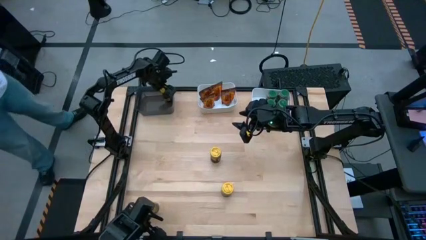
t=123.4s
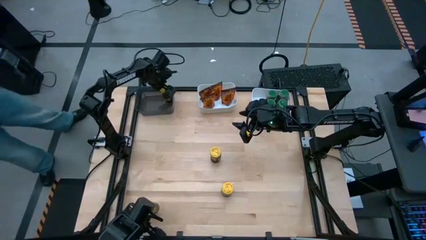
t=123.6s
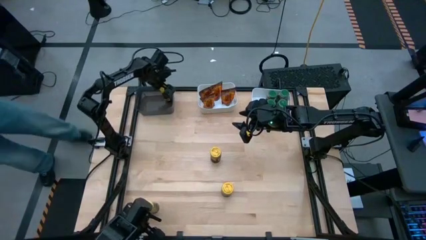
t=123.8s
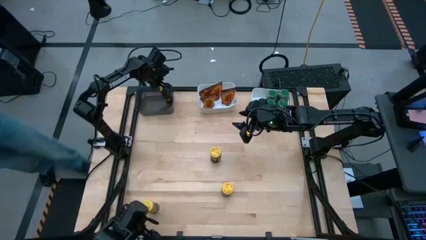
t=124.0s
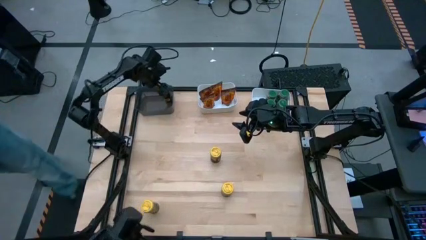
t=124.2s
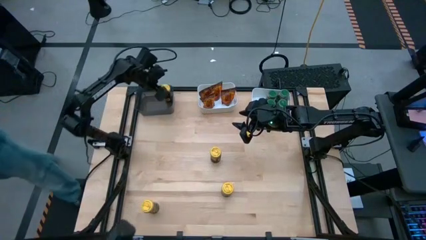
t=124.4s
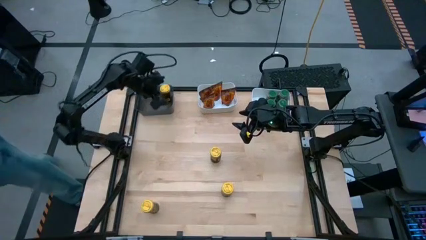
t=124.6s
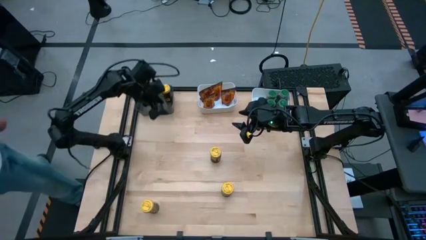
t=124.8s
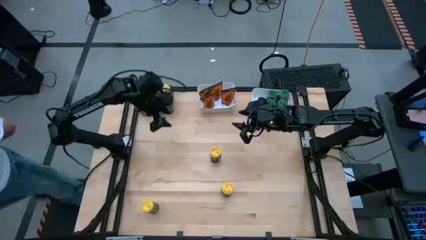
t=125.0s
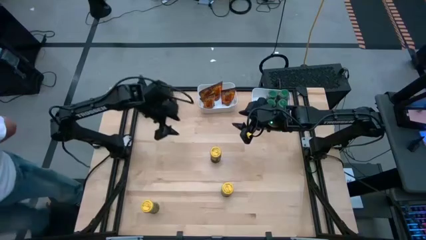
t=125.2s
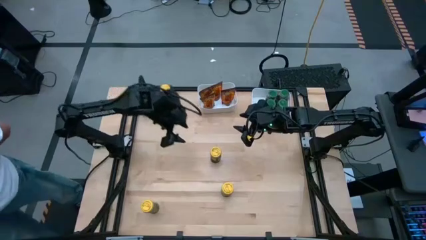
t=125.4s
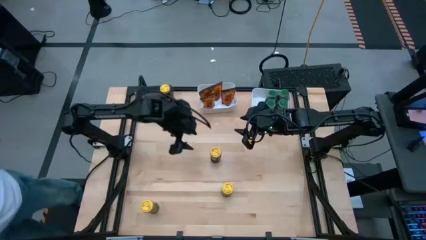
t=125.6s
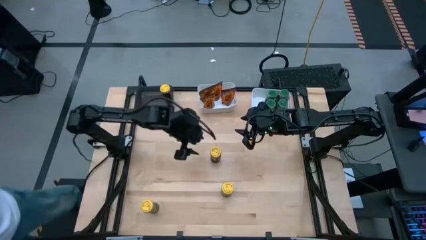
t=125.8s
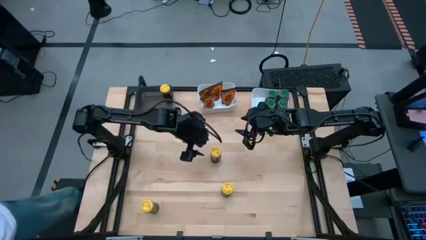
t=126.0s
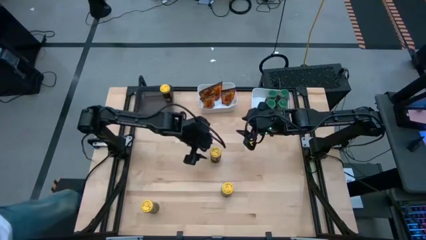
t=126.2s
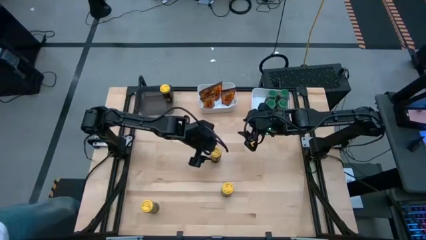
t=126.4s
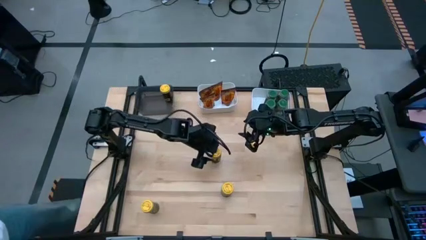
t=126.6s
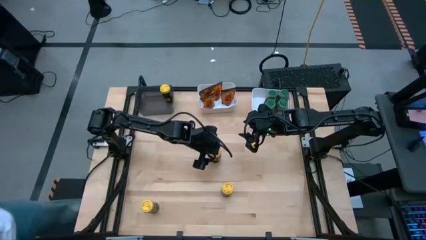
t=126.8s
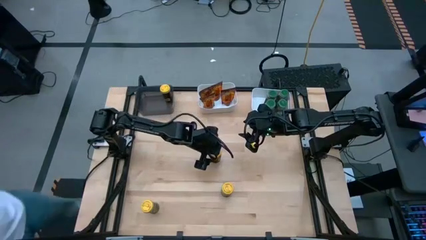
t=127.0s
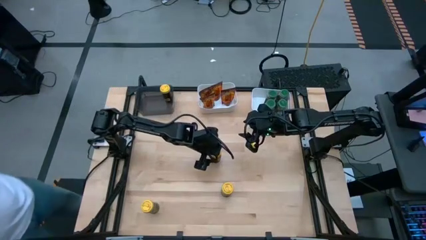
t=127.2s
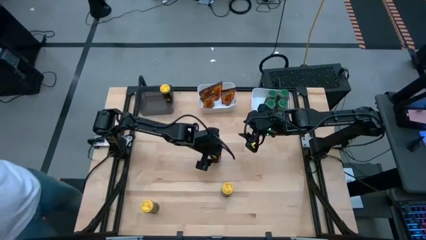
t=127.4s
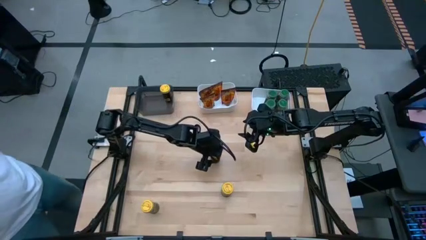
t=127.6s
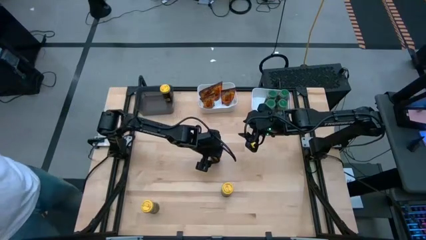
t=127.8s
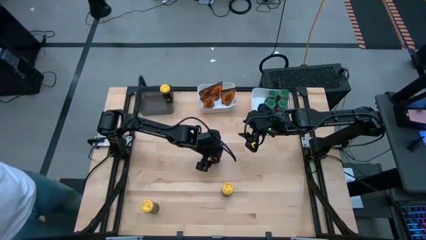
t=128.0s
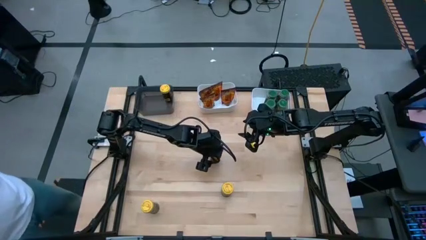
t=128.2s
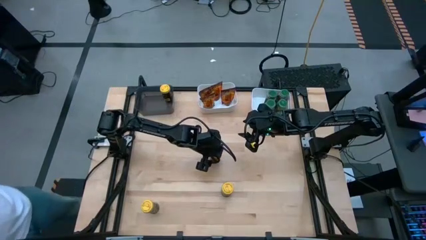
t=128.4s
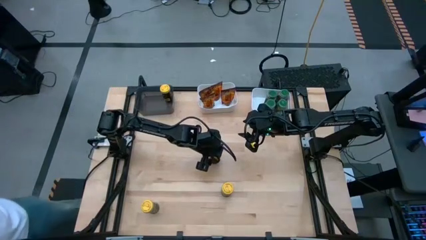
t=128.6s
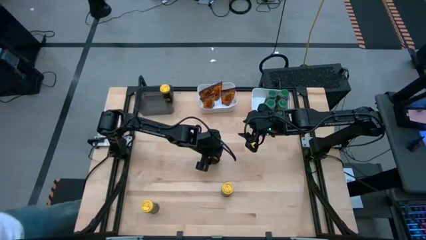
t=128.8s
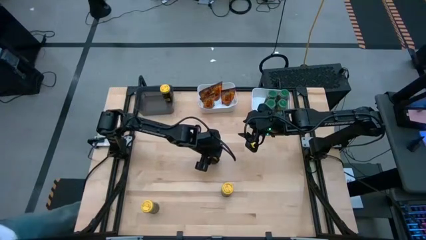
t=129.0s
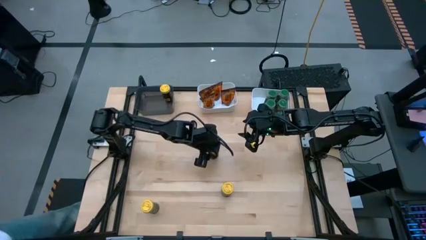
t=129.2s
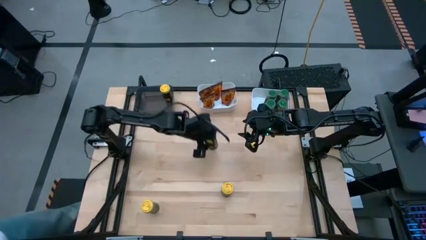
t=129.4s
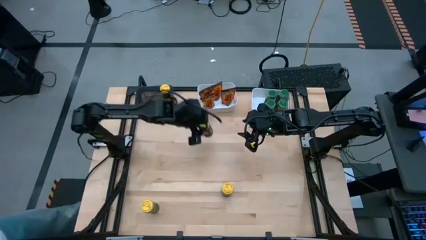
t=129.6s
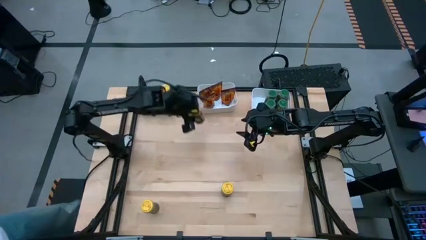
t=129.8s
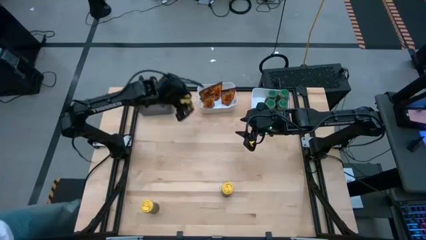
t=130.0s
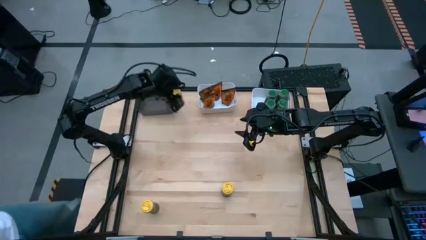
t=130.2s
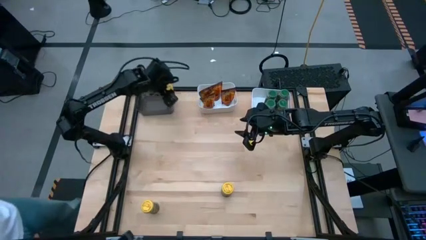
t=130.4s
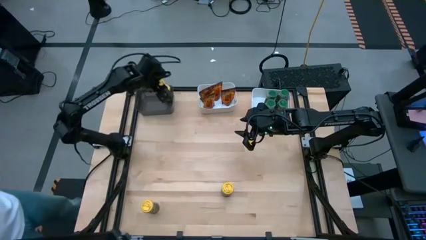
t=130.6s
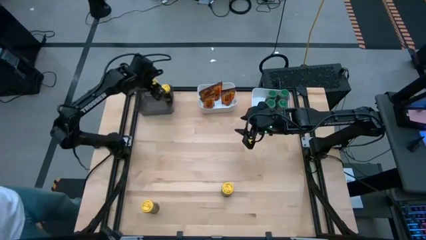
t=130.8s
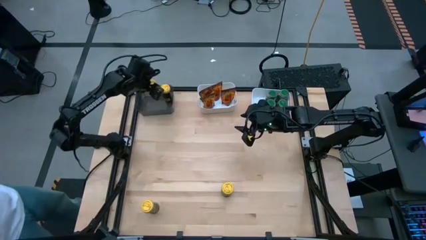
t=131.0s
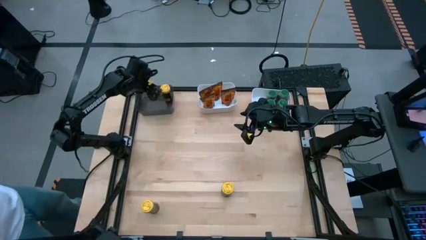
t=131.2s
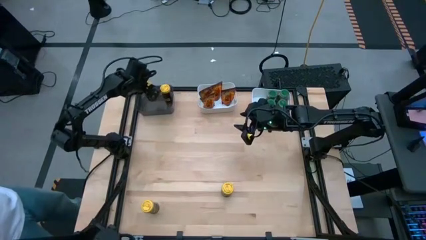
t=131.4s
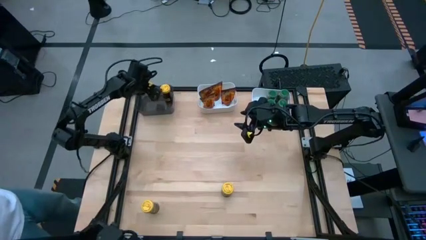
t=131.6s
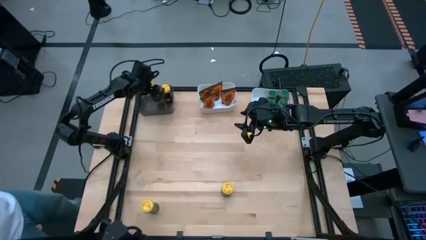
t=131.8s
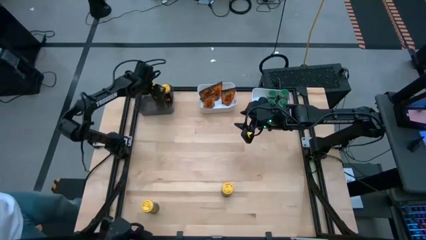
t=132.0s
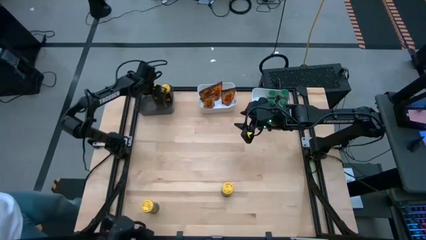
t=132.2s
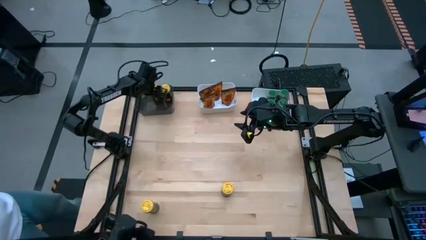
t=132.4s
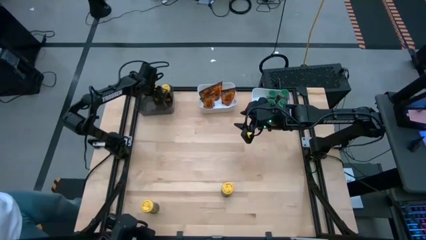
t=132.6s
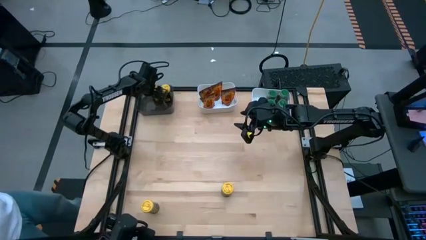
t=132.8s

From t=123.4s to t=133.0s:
Task: Sort spices by type
Put the top right yellow seasoning bottle into the black bin

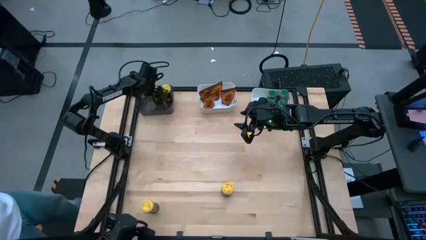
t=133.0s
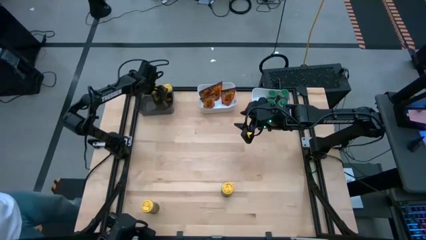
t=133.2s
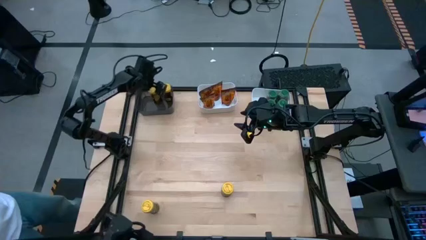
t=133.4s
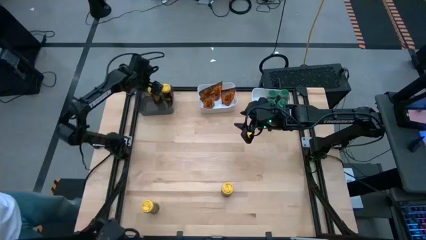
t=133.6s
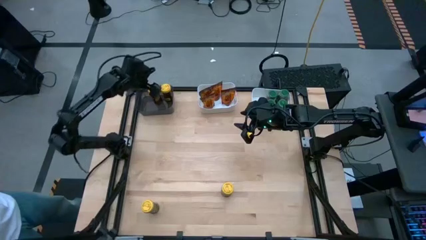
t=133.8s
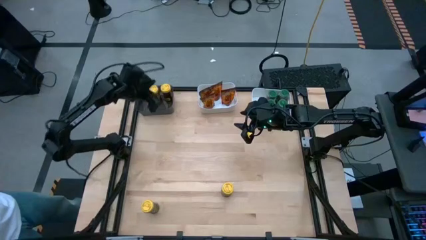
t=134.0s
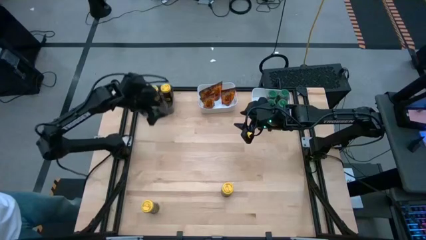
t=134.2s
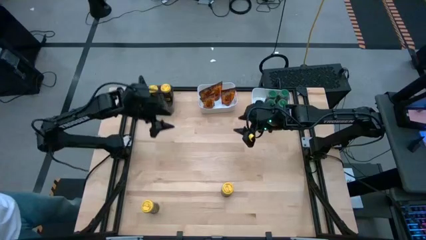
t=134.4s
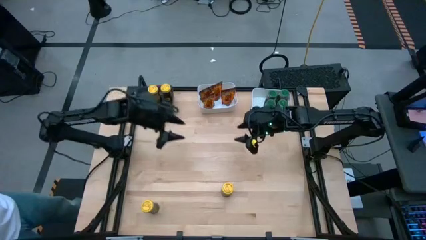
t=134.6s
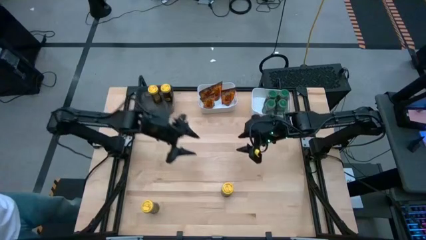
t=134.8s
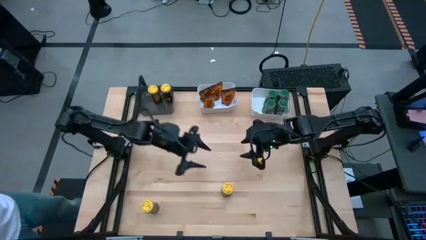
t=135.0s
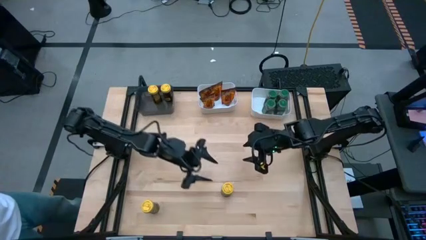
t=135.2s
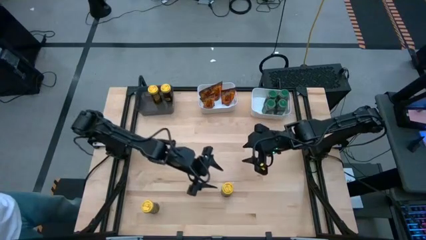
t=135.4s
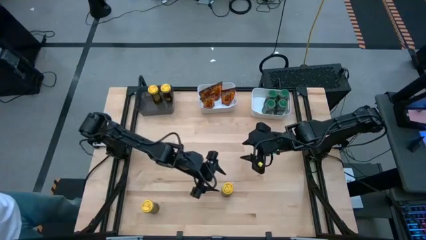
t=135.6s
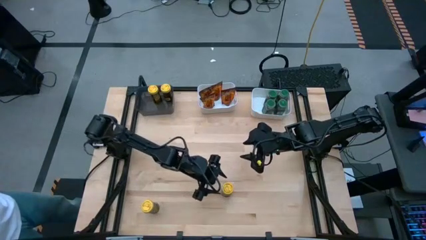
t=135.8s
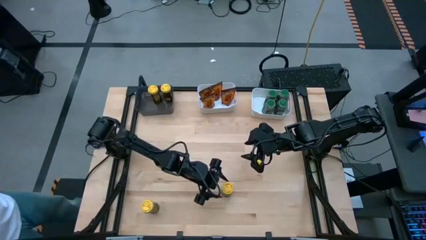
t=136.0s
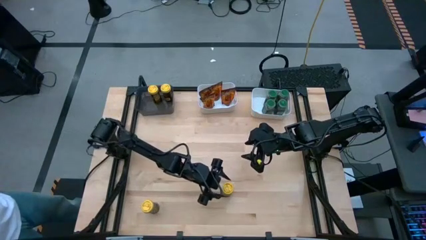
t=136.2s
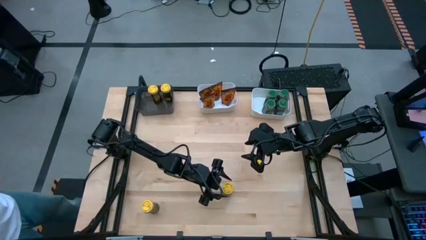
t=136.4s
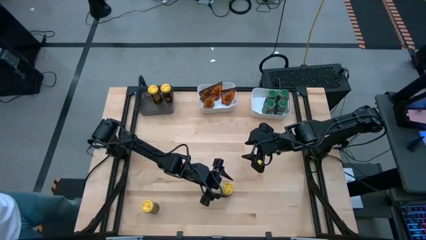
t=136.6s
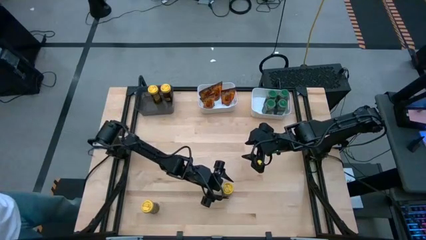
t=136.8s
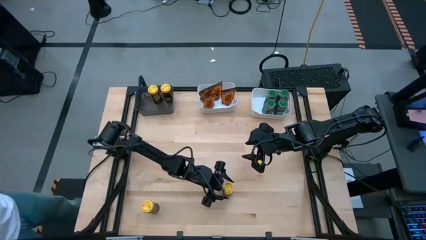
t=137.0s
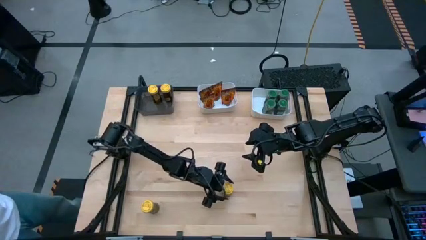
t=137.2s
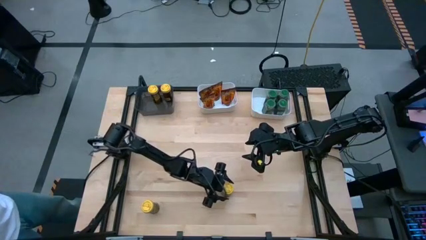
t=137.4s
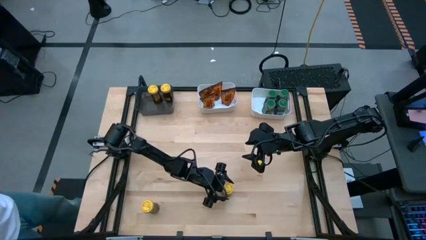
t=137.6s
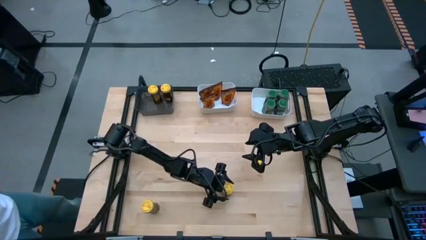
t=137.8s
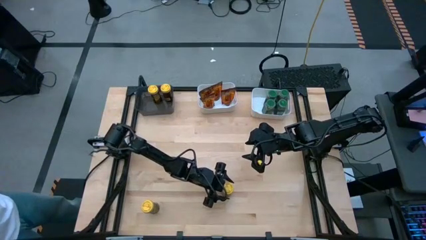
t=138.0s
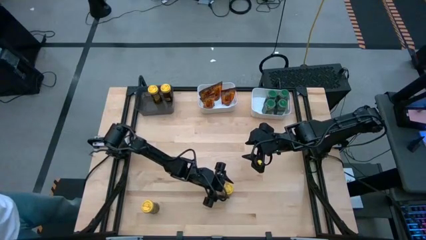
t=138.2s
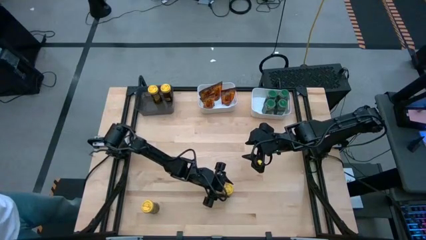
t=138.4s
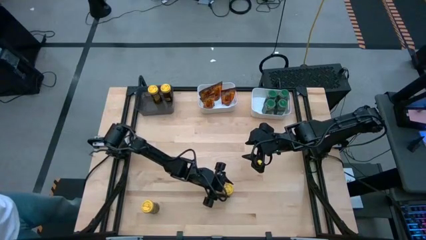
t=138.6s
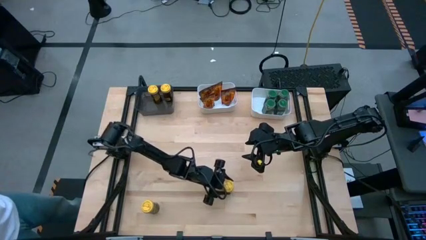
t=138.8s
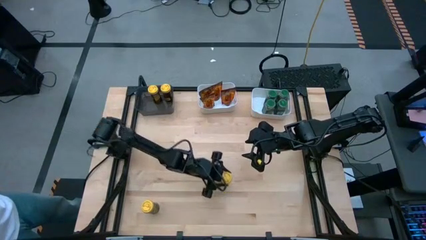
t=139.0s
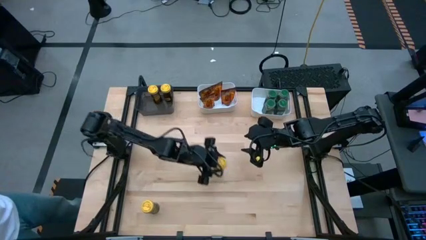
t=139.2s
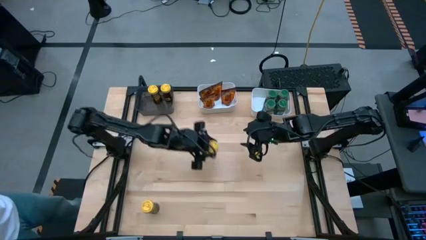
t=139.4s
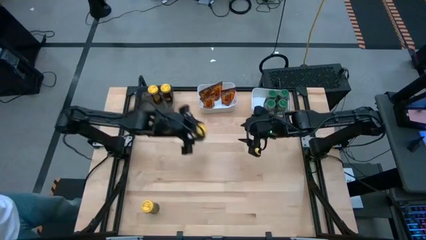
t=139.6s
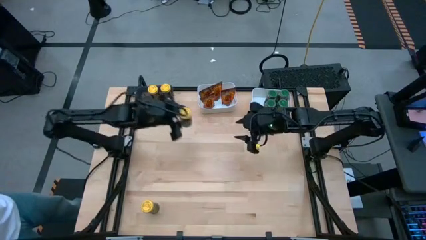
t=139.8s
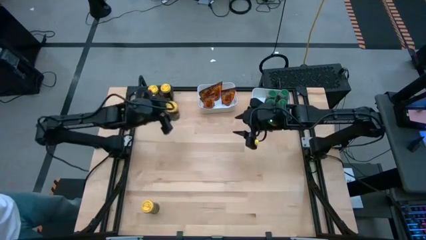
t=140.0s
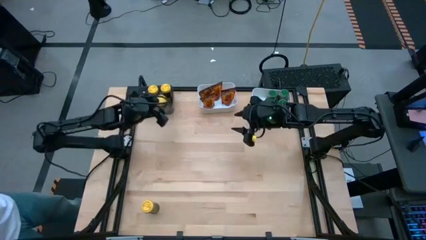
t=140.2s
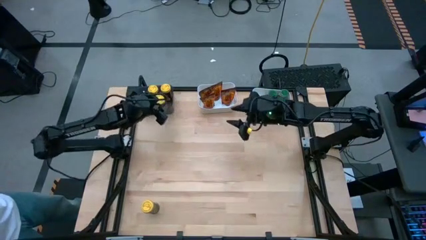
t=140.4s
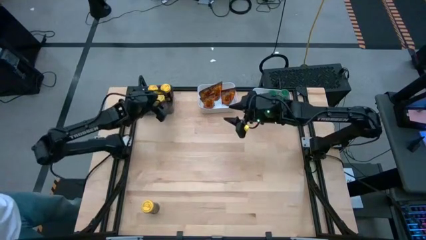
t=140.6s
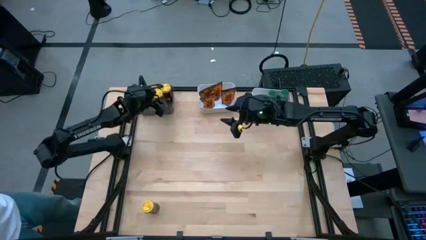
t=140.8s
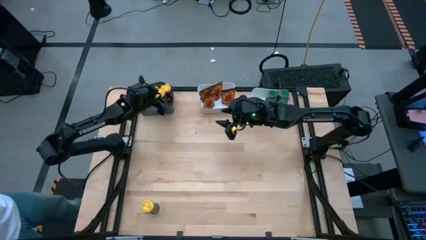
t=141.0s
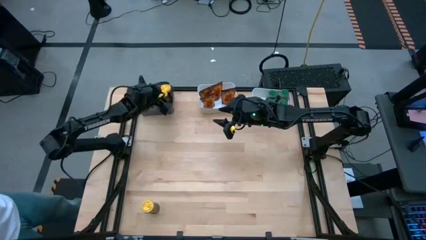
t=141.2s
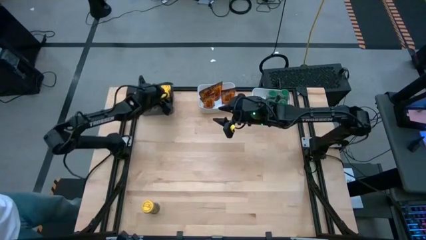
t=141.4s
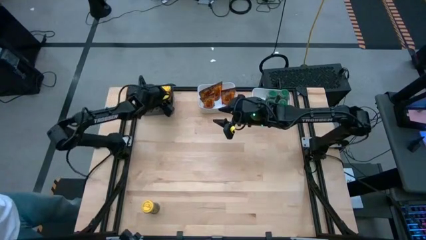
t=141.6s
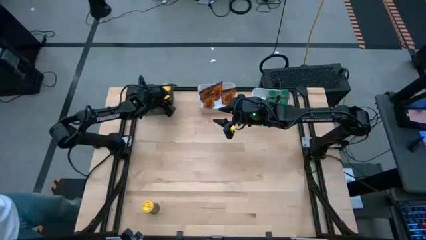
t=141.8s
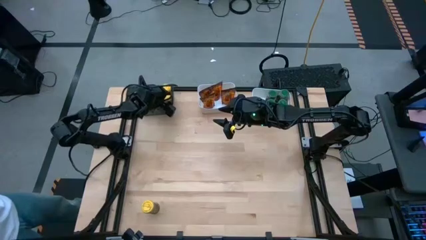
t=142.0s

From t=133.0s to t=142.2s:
Put the right yellow seasoning bottle into the black bin
